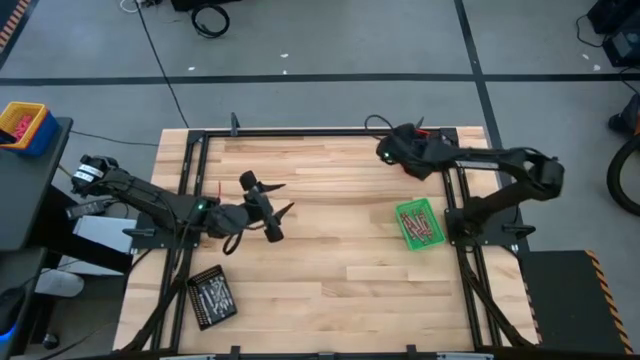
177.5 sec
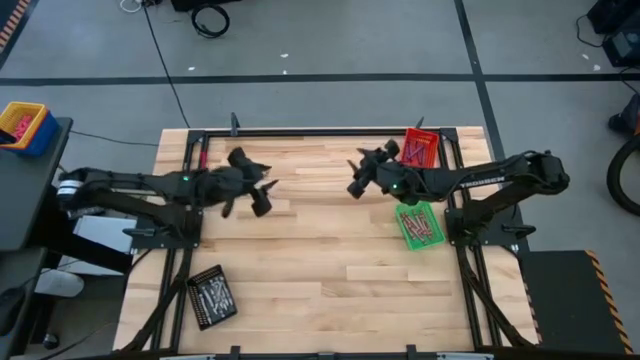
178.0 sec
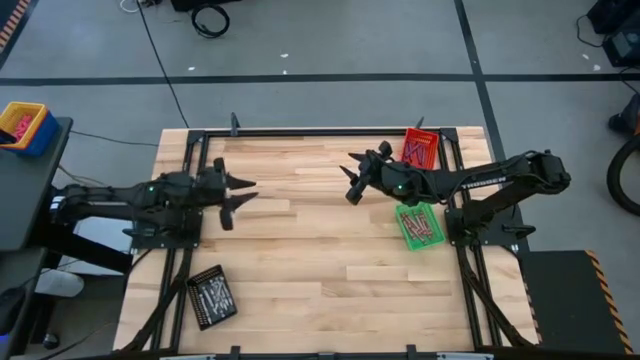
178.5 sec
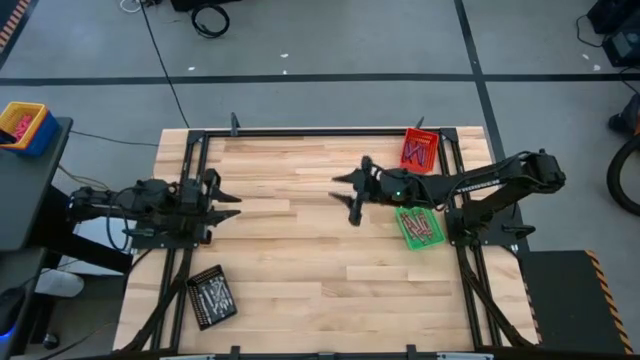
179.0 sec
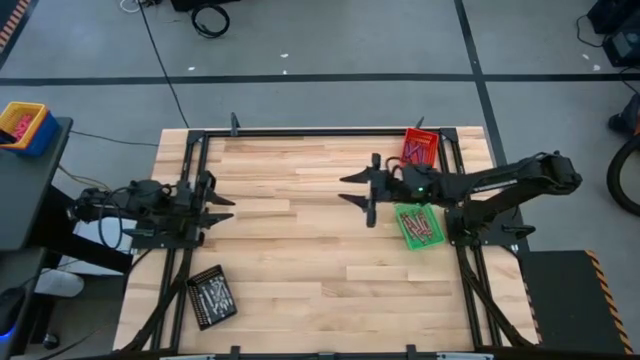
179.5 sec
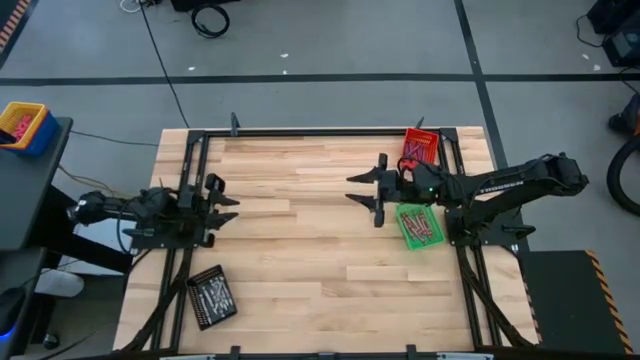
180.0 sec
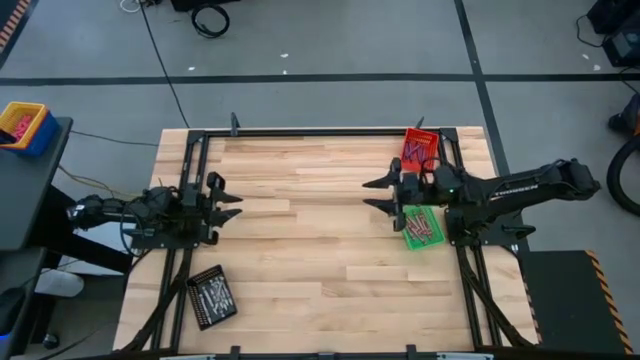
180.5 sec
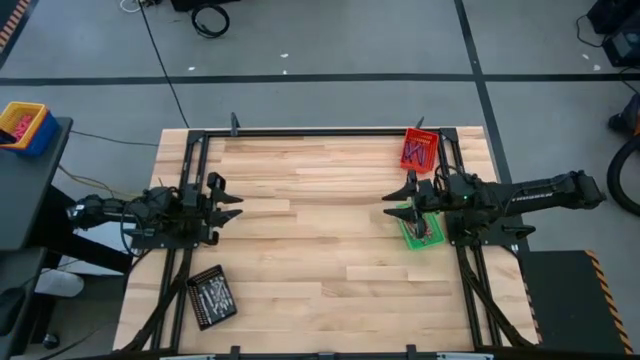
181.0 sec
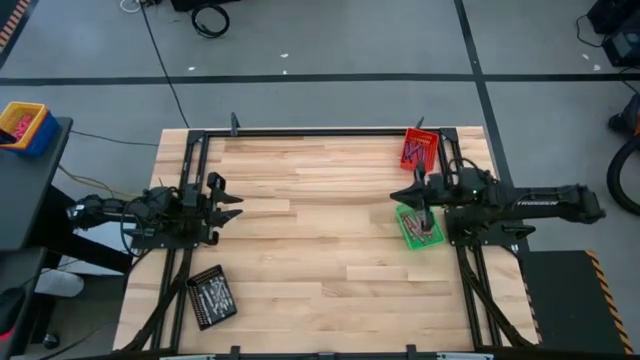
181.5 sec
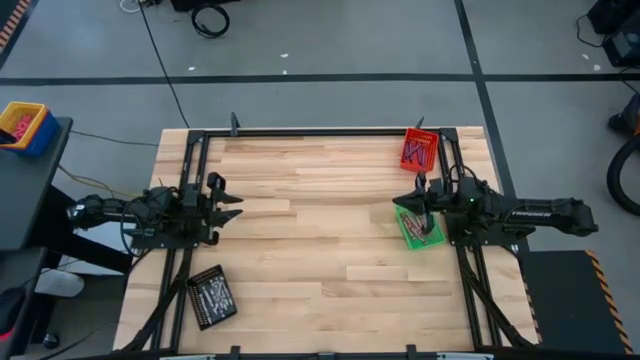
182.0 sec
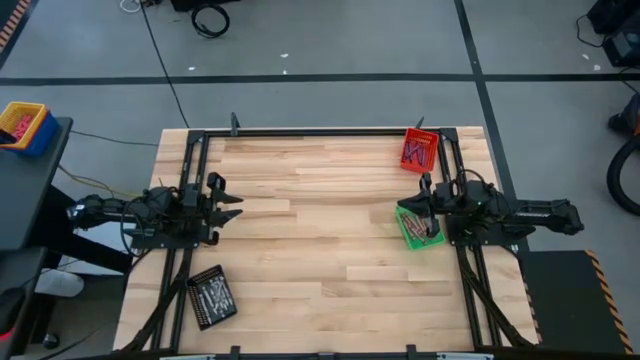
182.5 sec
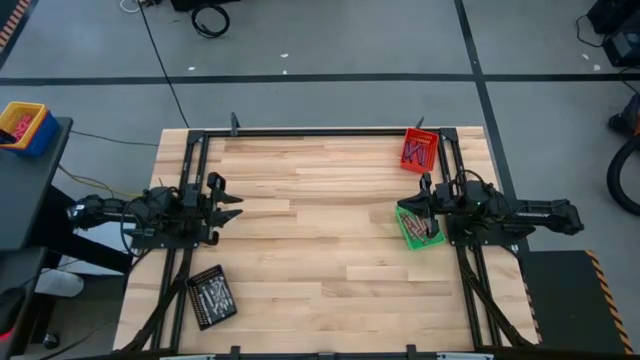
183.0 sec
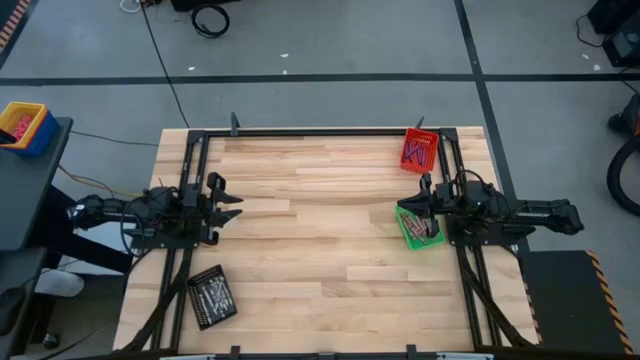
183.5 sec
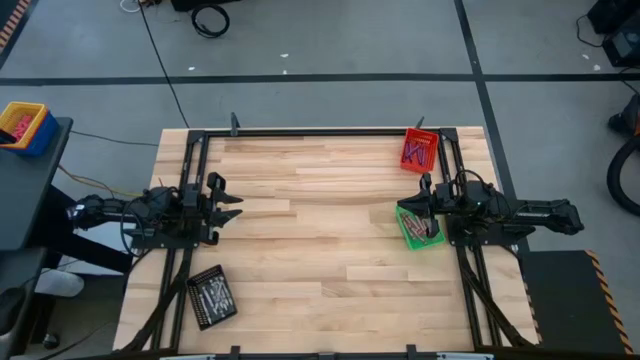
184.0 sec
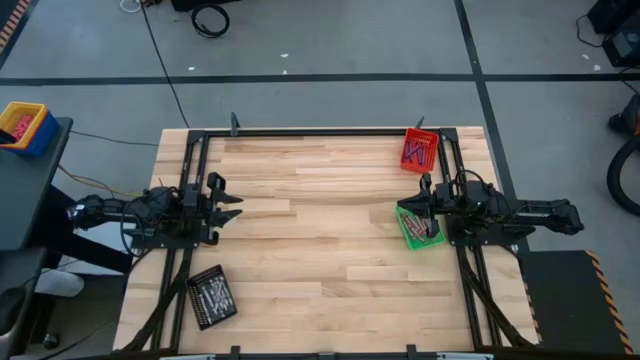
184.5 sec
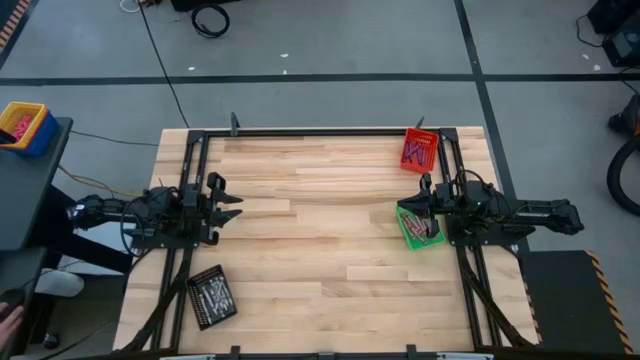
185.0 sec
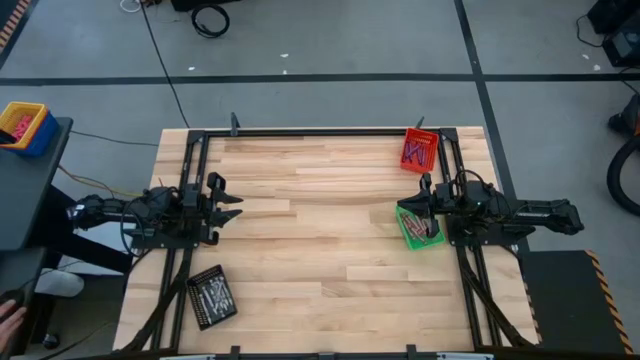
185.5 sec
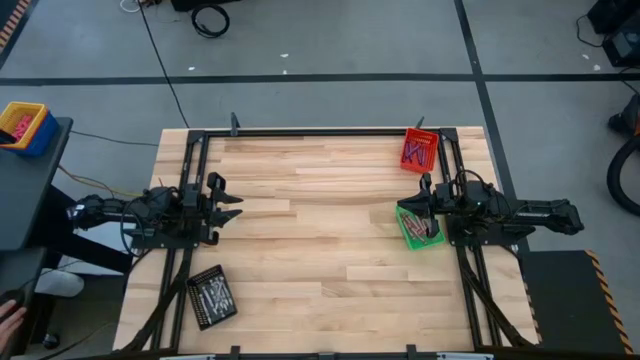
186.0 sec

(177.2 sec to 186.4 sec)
Task: Sort crayons
Return to Home Position

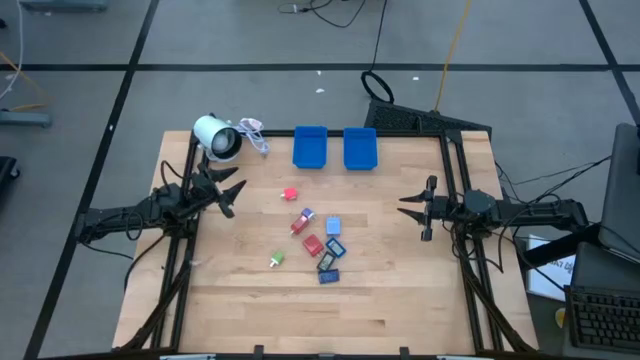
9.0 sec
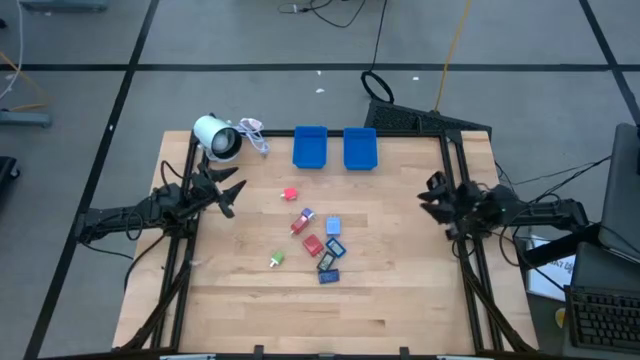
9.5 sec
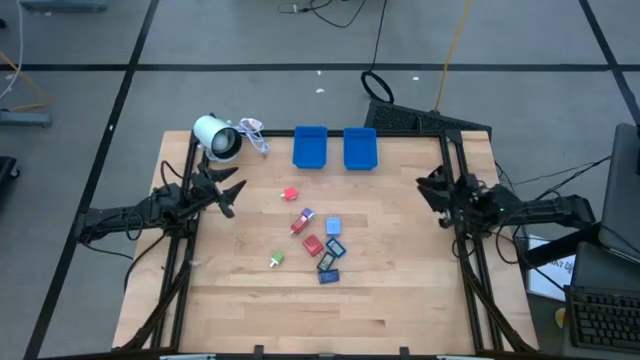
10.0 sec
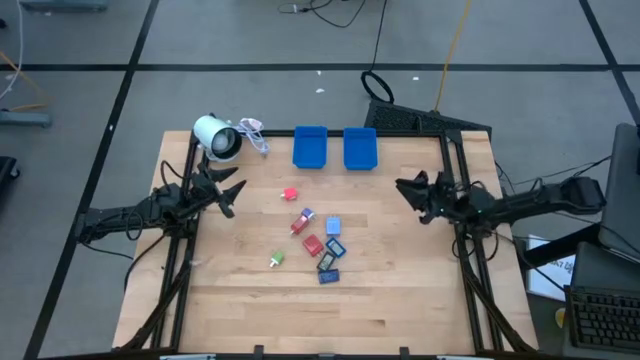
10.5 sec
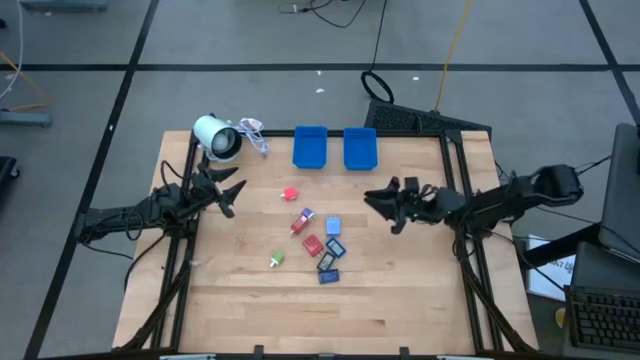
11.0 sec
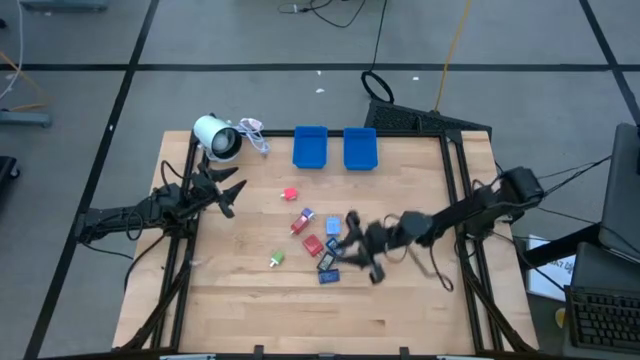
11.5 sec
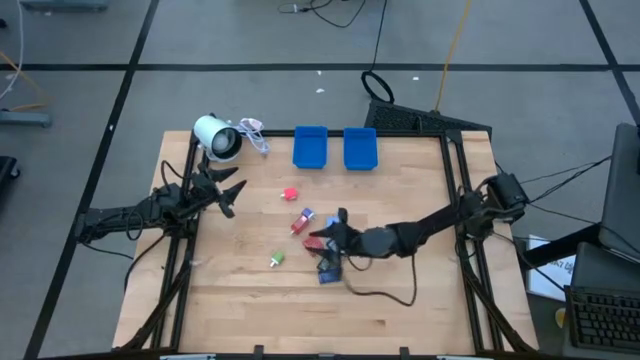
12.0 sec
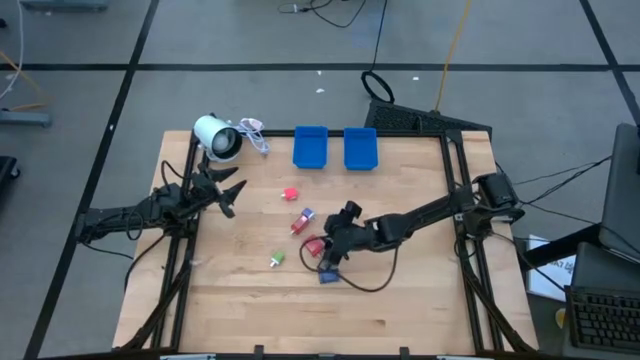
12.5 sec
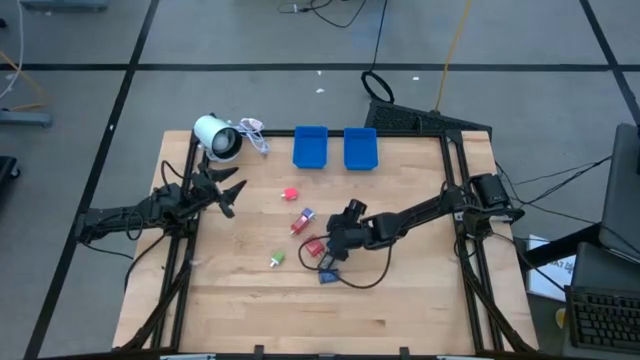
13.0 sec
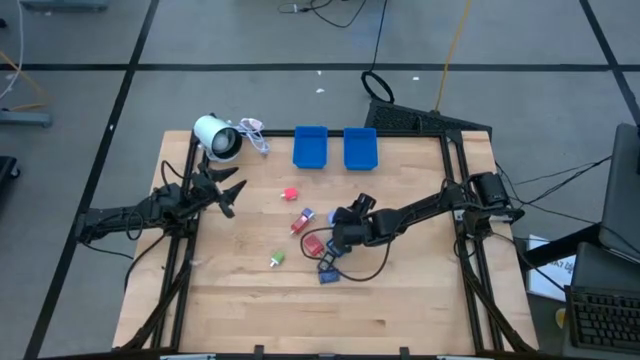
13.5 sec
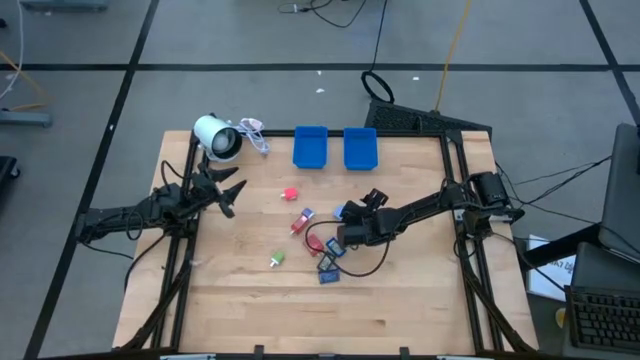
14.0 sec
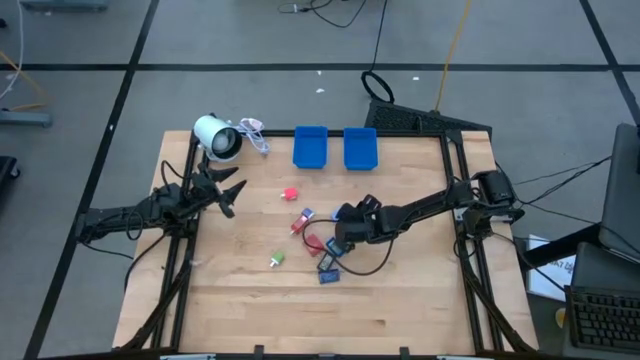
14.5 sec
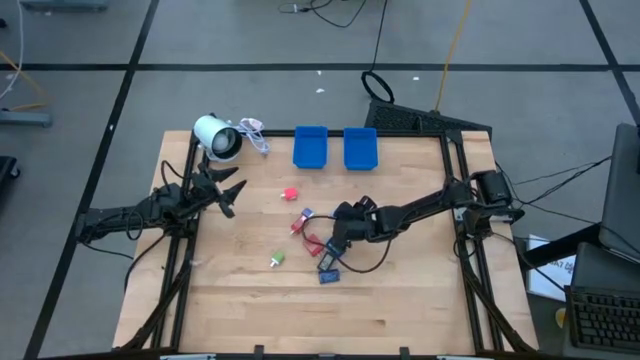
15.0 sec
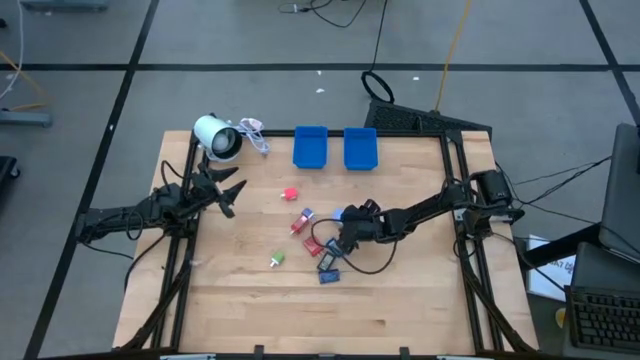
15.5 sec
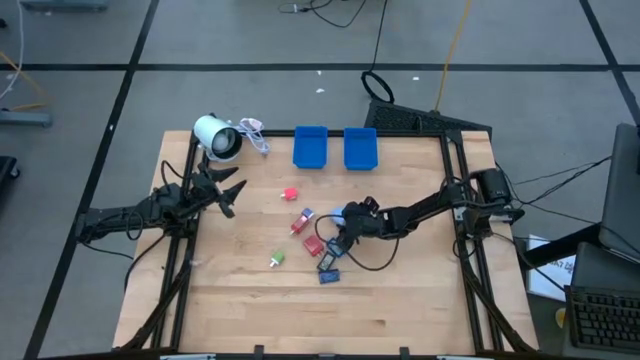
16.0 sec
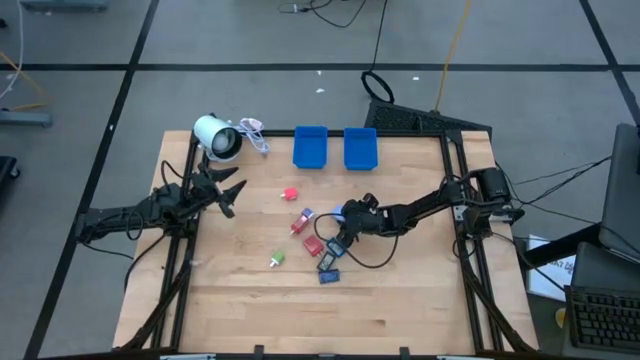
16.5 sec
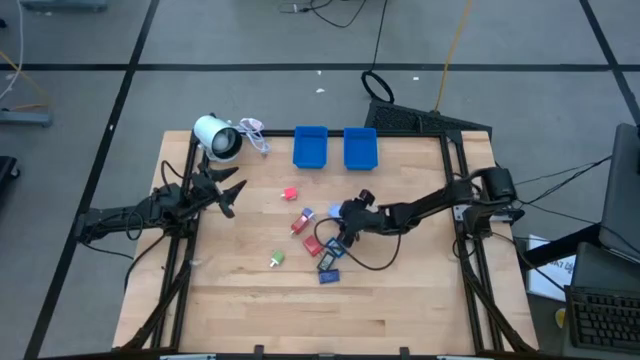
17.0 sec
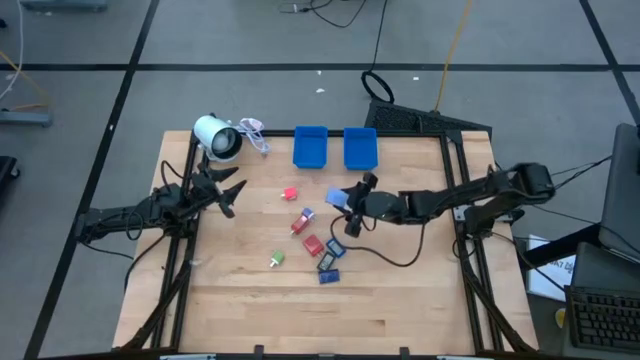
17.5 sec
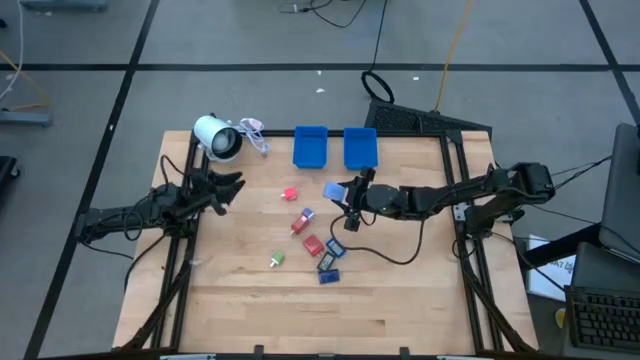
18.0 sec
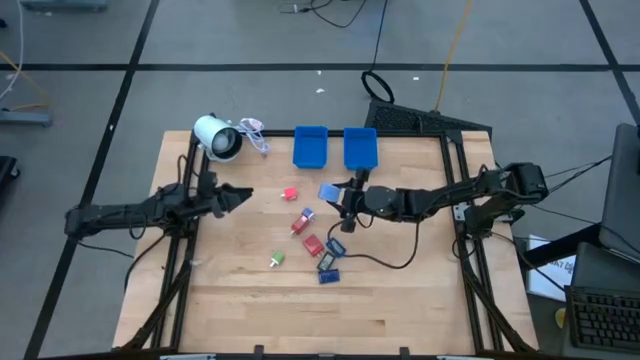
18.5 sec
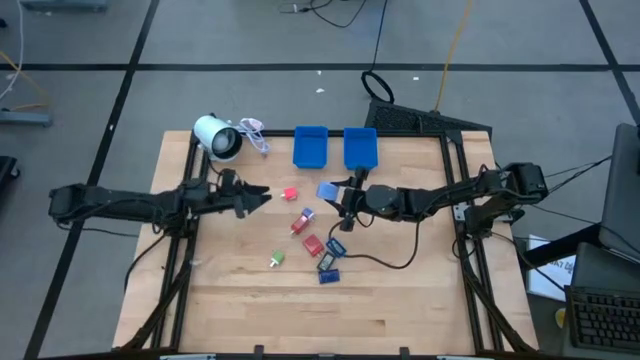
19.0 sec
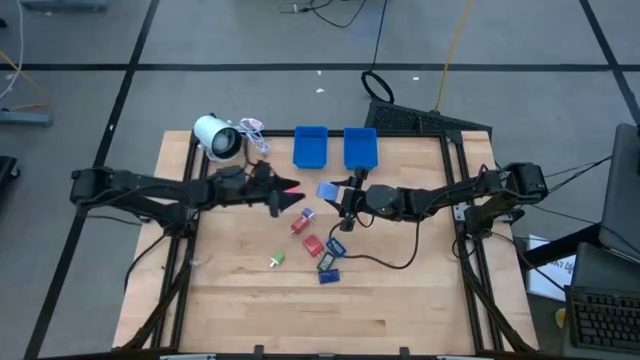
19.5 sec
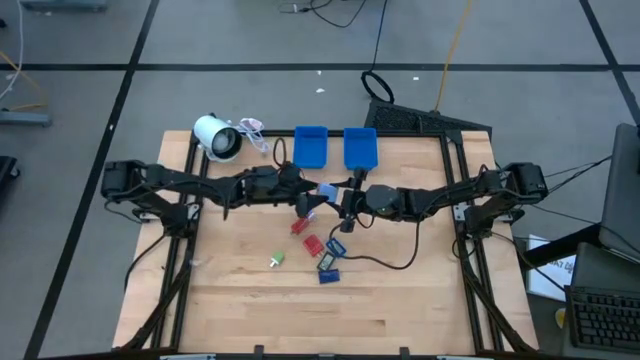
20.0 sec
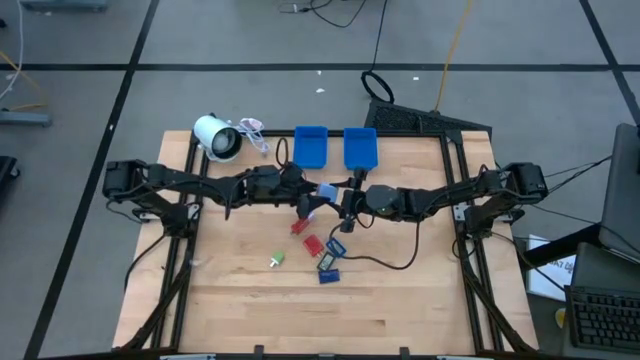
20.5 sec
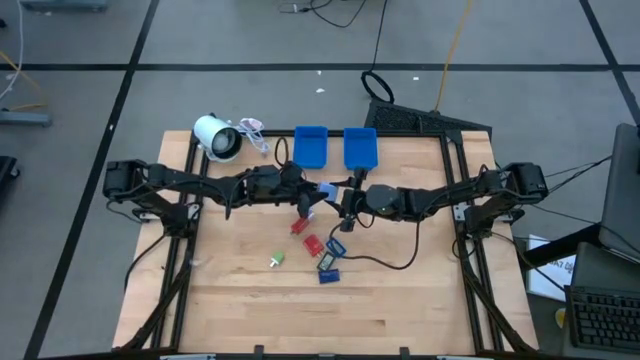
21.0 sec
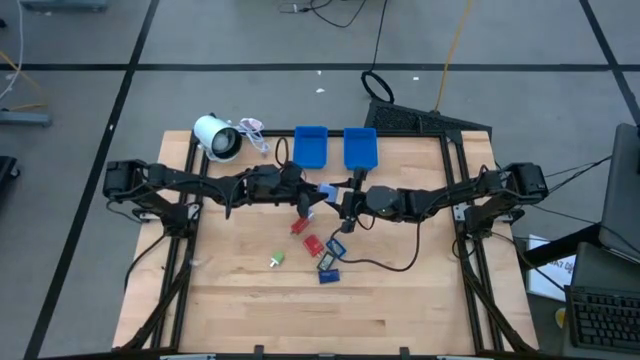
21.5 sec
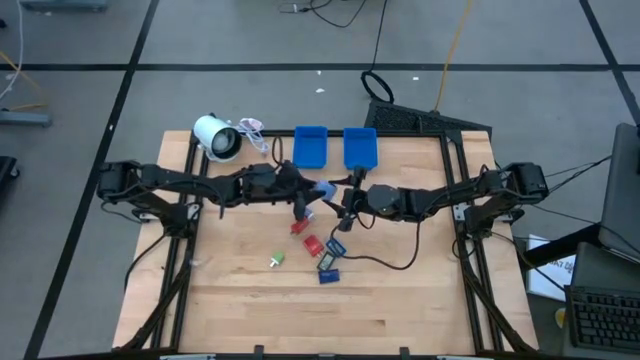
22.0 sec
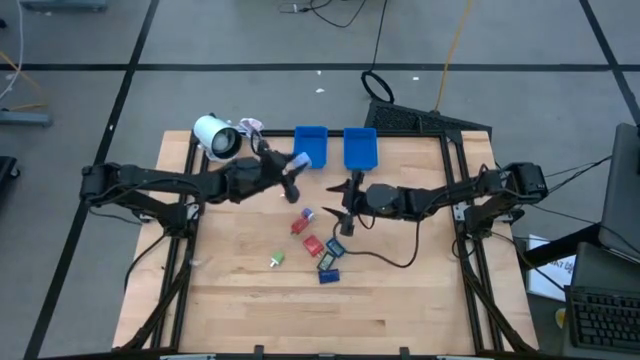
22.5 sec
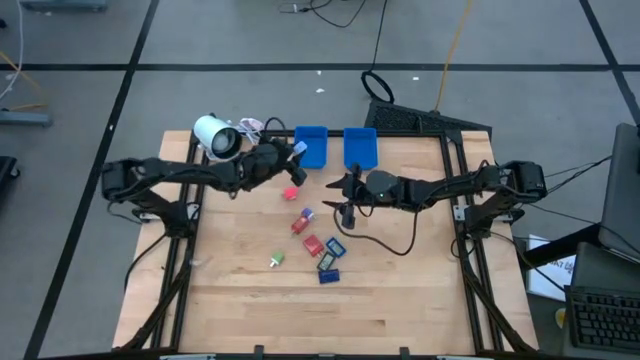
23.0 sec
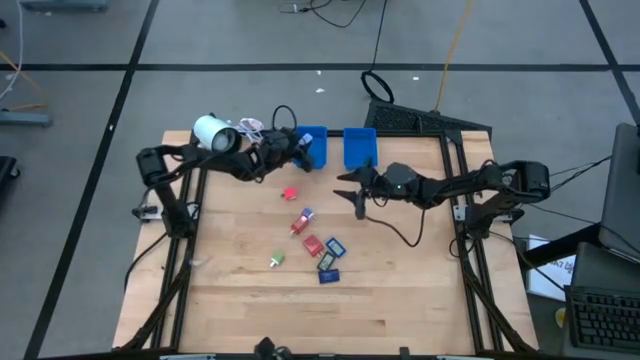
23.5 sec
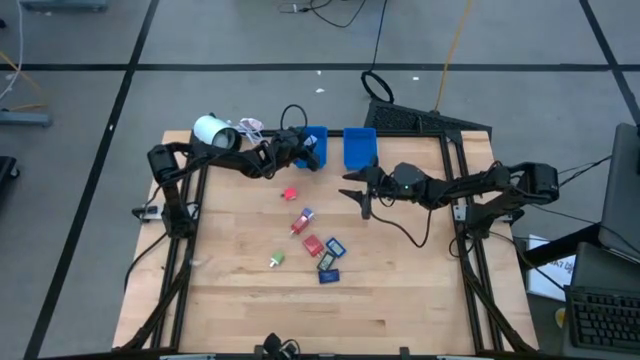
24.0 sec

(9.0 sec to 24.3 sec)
Task: Pick & Place Office items
Put the light blue charger adapter into the left basket
